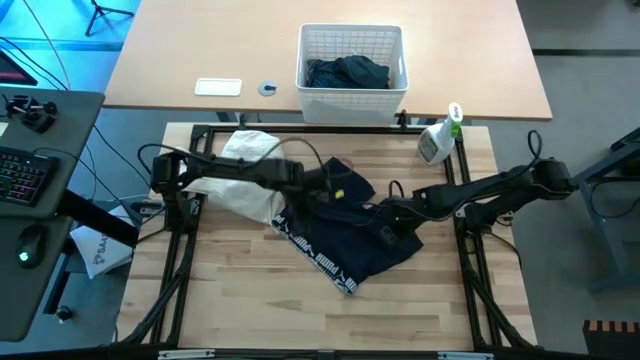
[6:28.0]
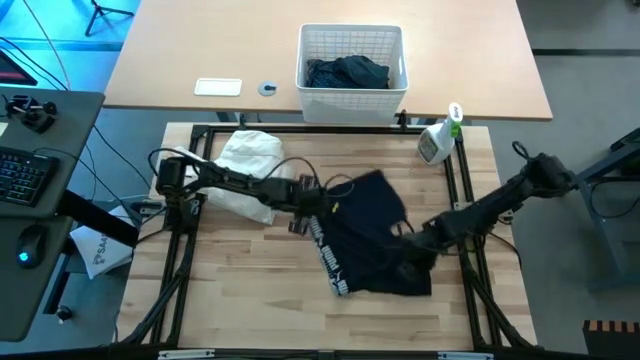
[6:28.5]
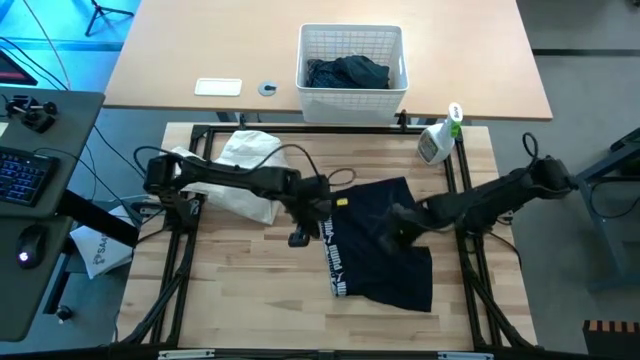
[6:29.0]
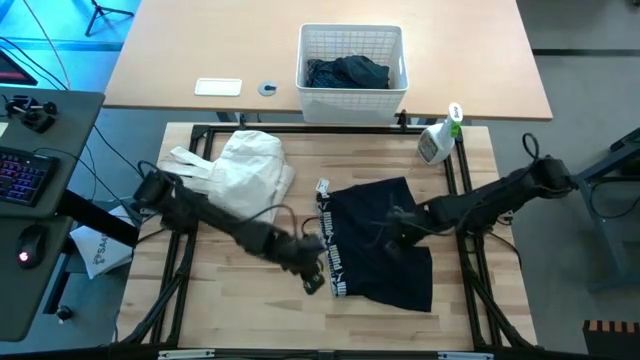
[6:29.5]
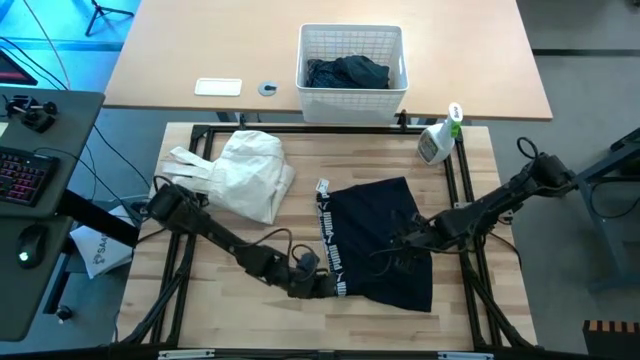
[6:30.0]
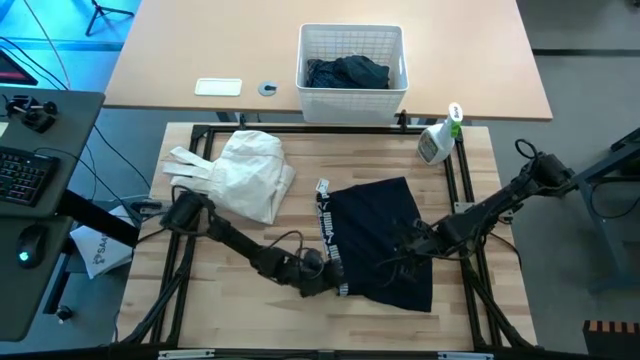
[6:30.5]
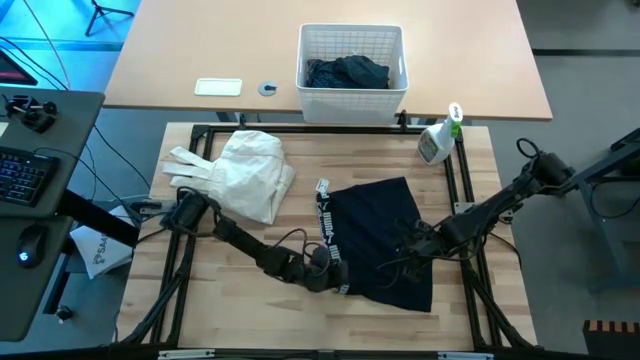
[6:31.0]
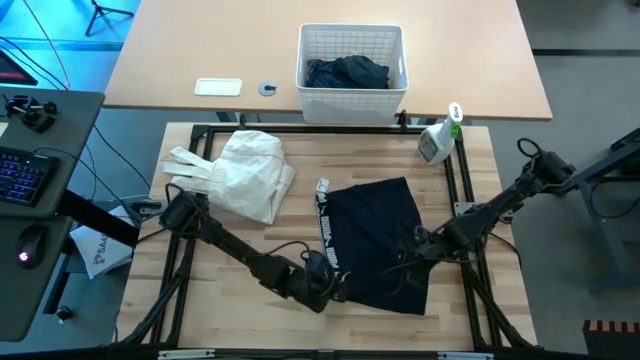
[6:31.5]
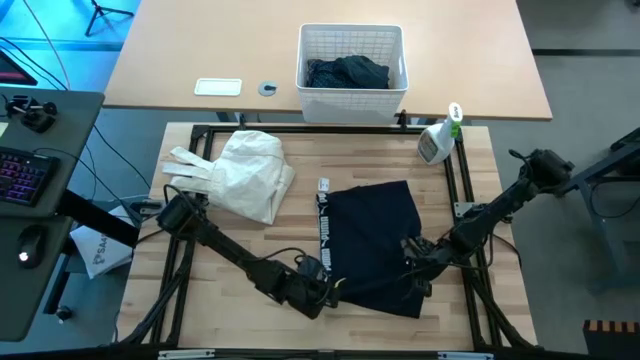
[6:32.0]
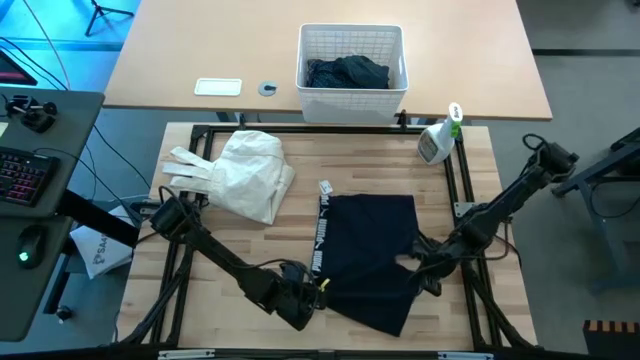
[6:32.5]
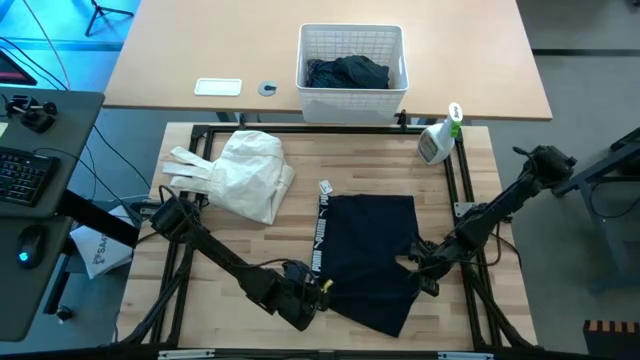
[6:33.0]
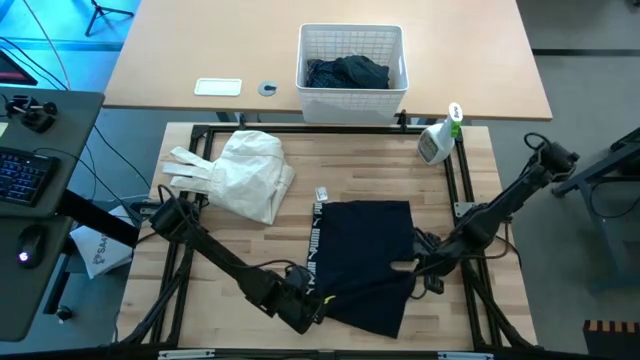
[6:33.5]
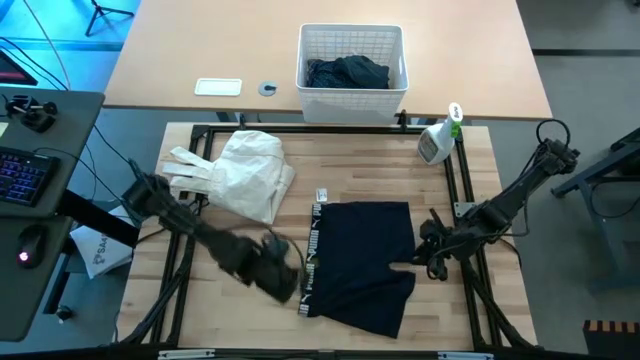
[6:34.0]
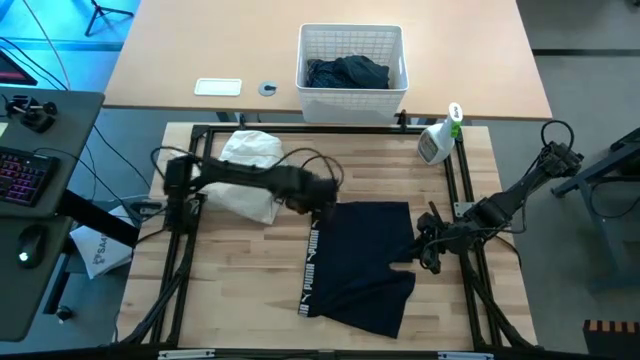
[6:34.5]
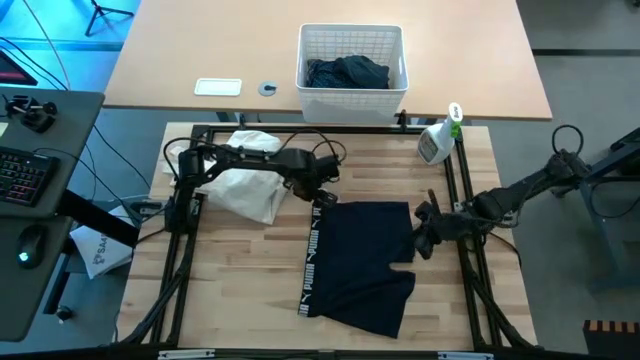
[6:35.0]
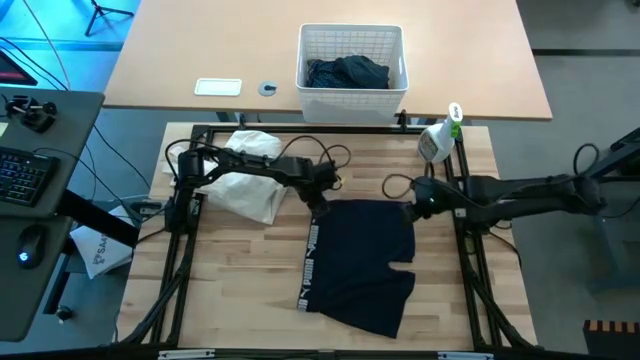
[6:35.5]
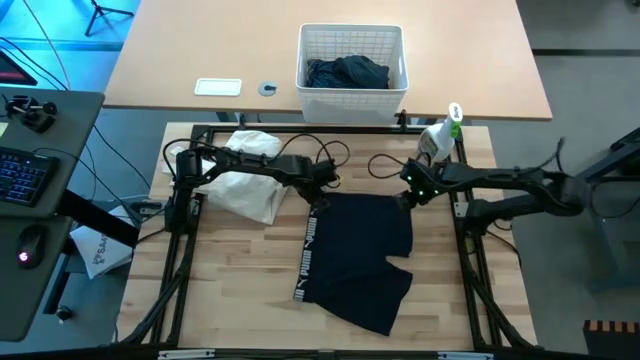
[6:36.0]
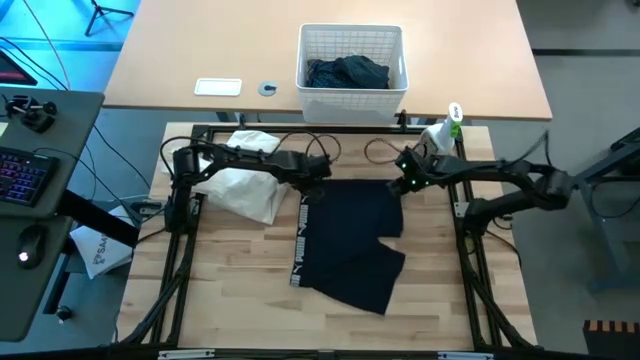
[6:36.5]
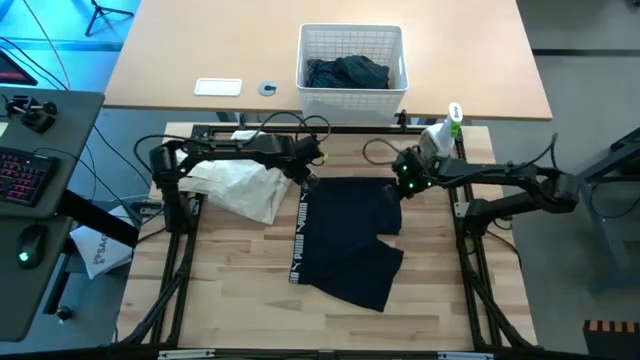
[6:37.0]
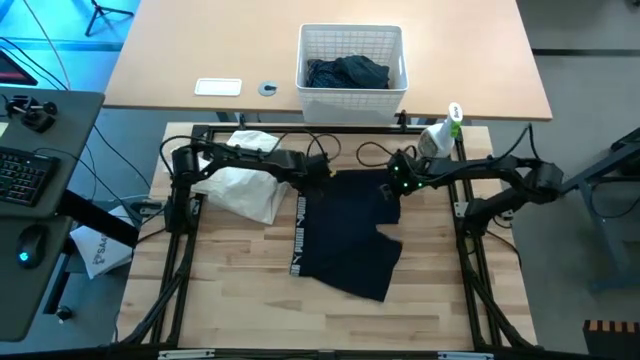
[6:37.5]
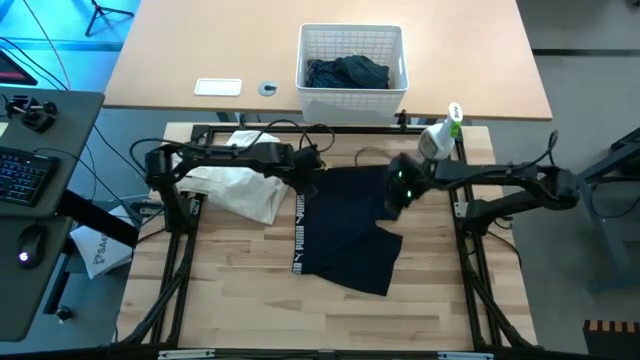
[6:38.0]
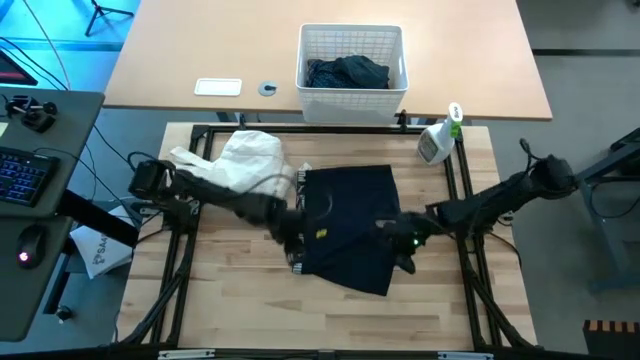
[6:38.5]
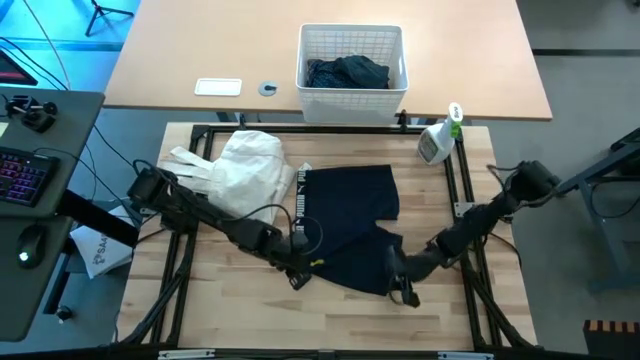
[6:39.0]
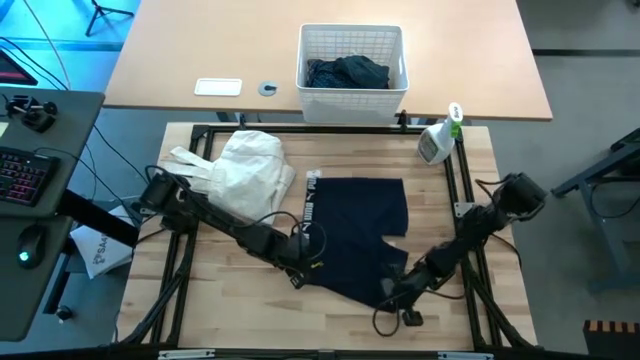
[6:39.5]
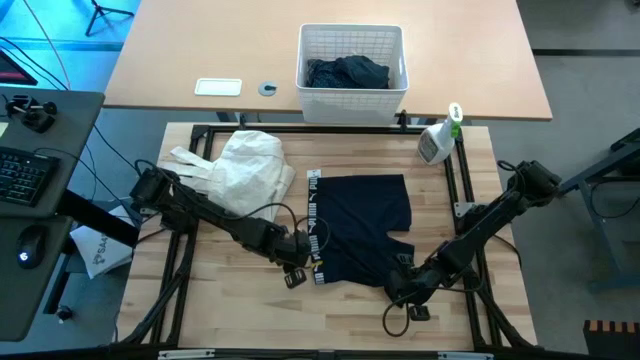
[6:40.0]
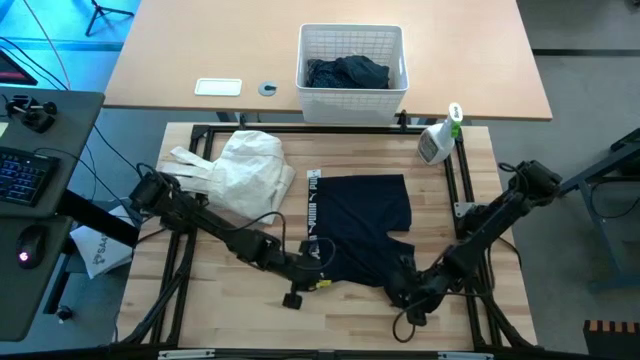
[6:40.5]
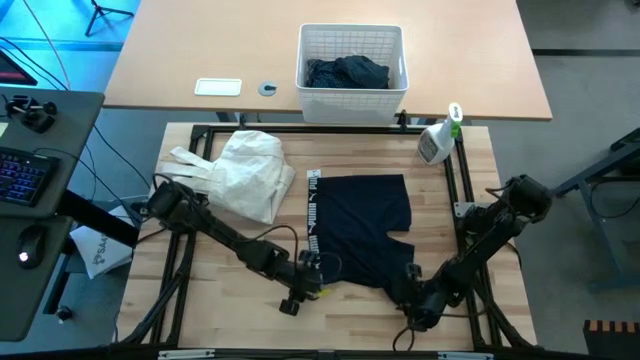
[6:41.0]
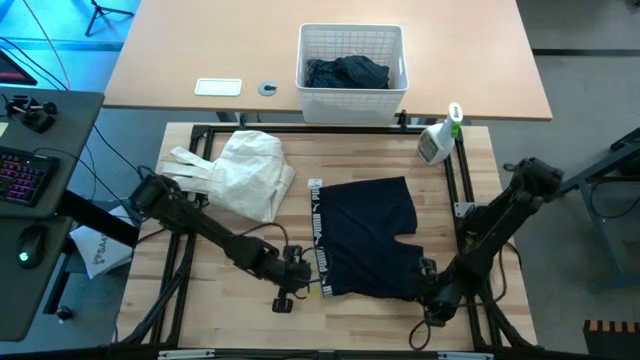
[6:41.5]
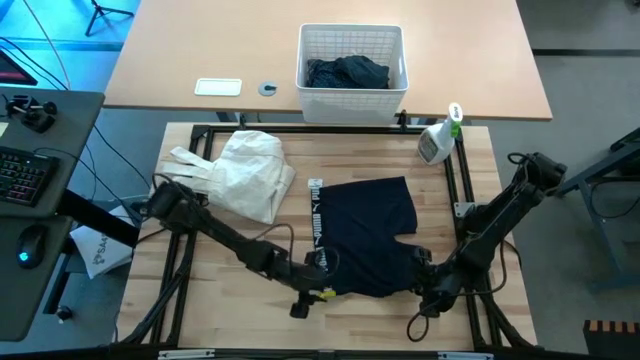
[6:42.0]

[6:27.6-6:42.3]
Task: Fold laundry
Fold the blue underwear

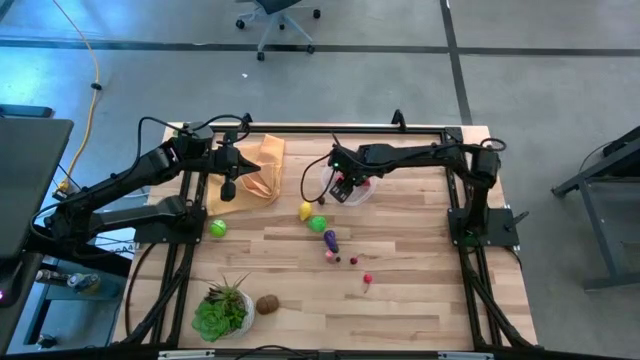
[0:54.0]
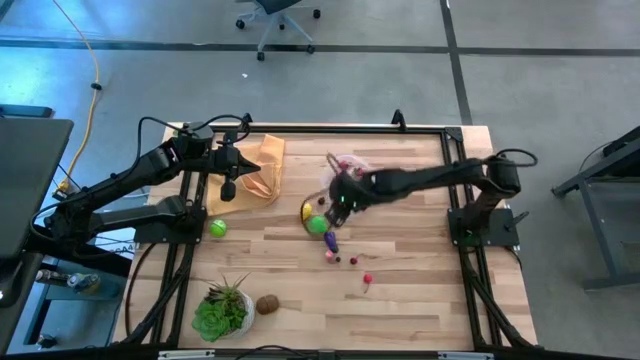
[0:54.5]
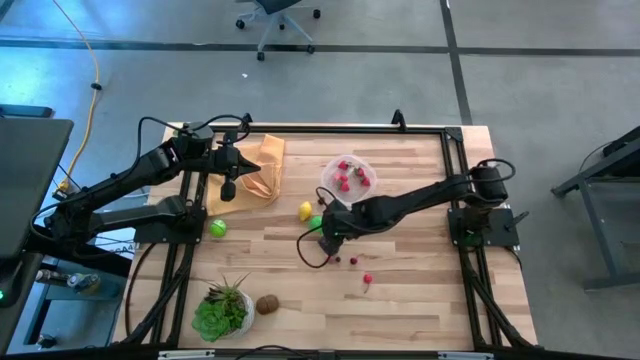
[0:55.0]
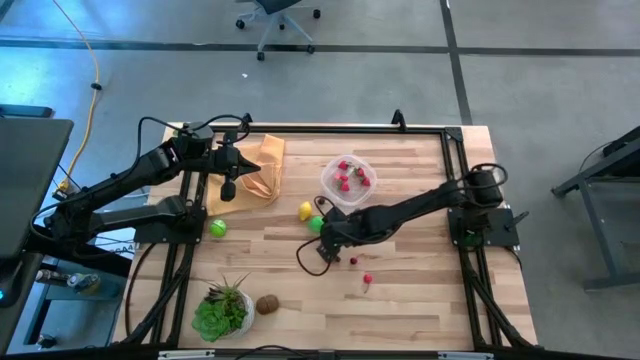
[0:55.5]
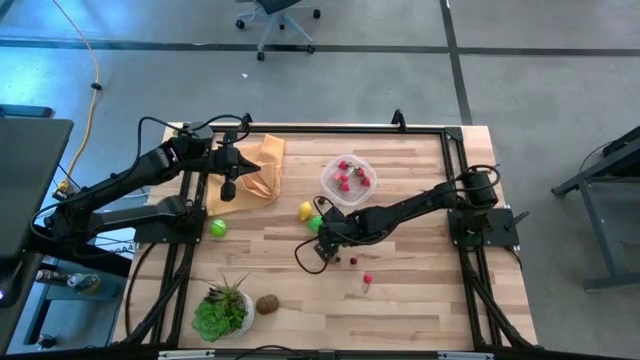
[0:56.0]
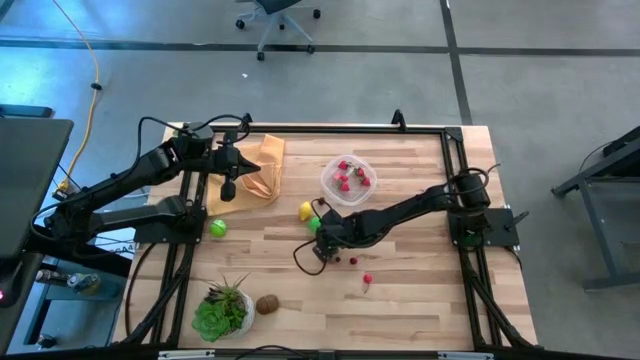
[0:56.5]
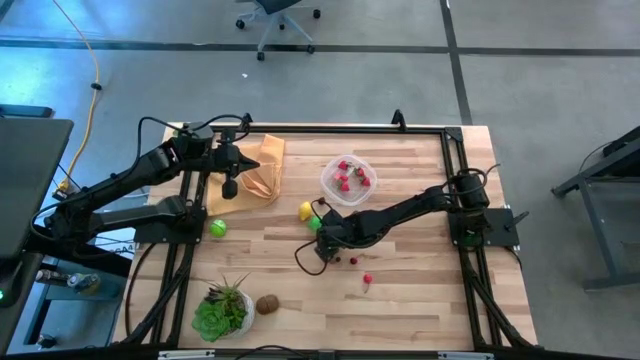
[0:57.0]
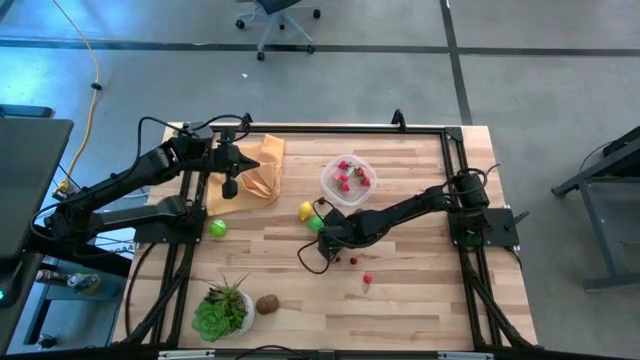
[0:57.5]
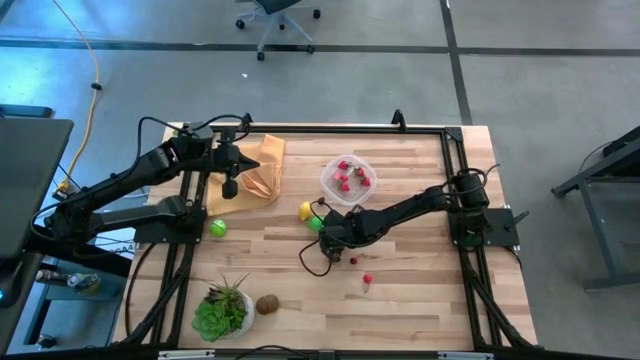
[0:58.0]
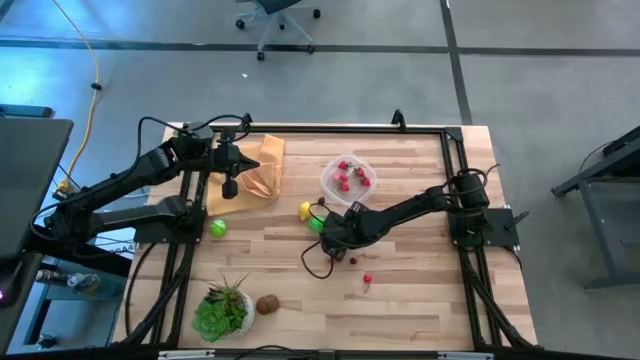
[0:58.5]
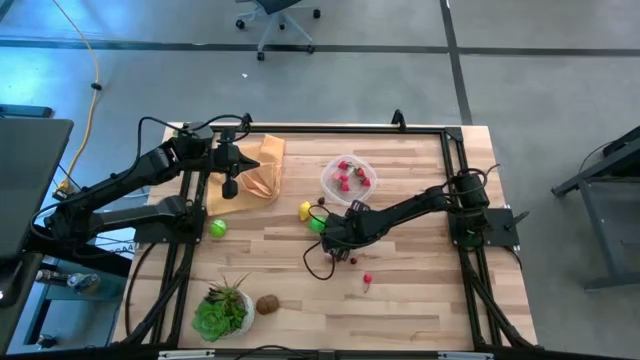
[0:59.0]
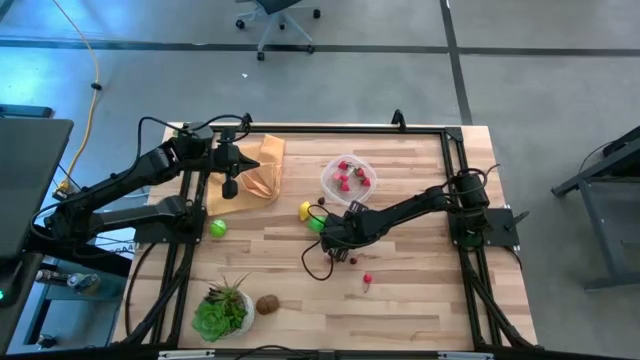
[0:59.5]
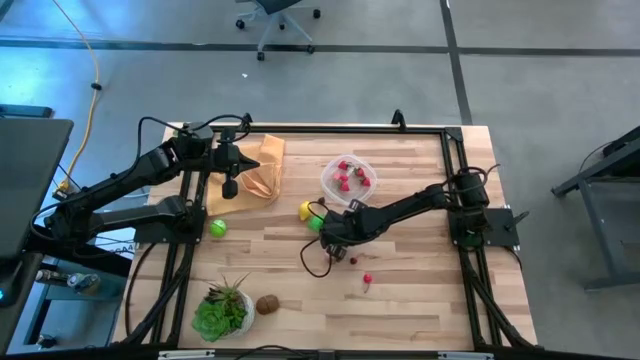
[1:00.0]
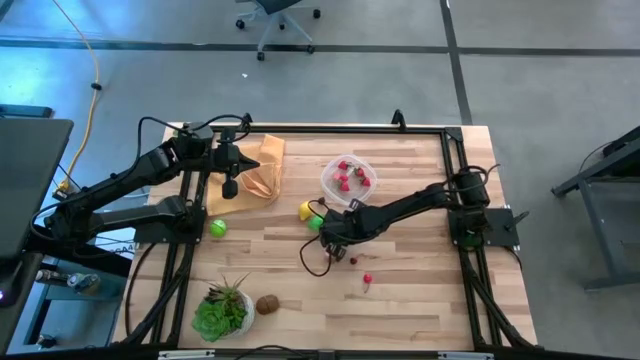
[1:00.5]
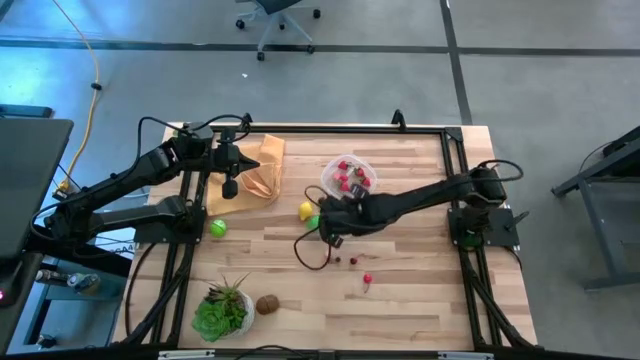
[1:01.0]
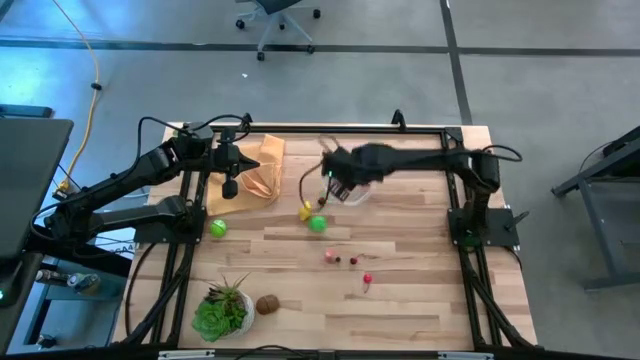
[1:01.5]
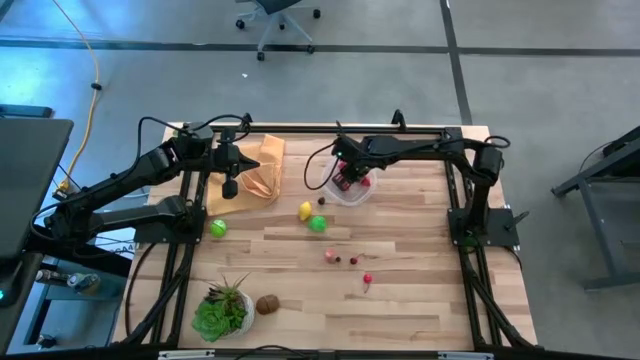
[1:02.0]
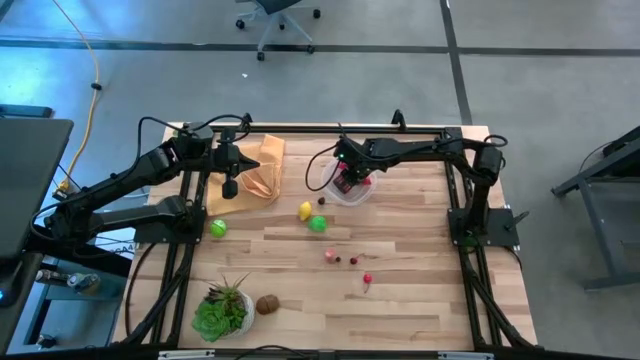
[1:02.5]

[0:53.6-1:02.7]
Task: Pick and placing Produce into tupperware
Put the purple eggplant into the transparent container
